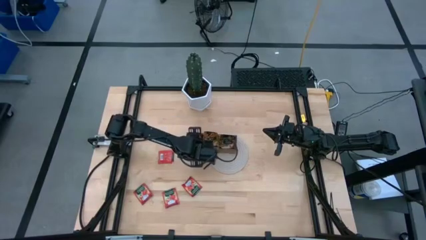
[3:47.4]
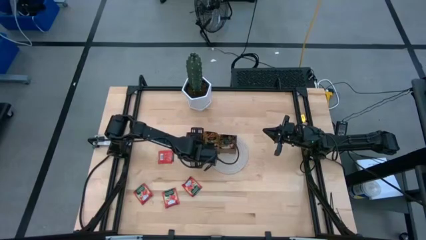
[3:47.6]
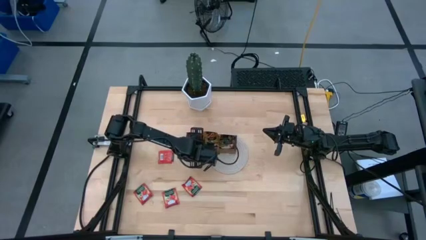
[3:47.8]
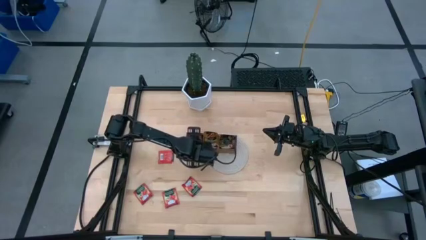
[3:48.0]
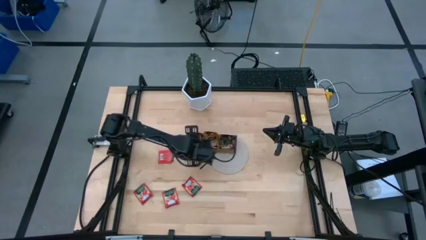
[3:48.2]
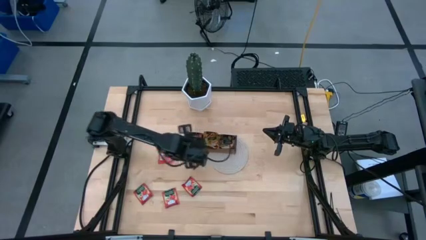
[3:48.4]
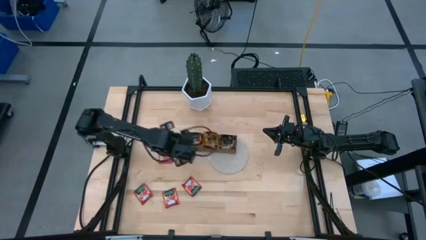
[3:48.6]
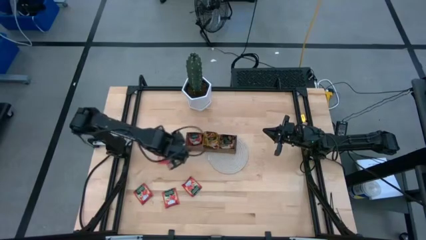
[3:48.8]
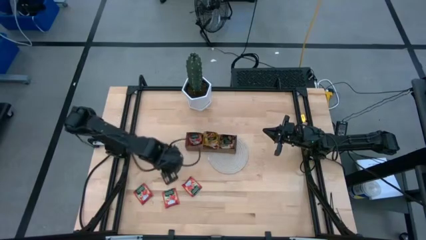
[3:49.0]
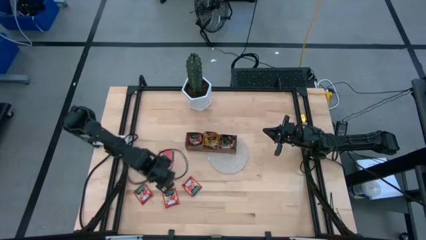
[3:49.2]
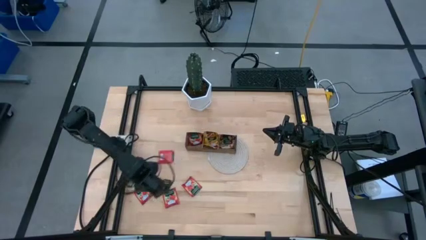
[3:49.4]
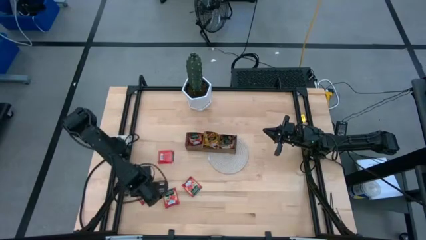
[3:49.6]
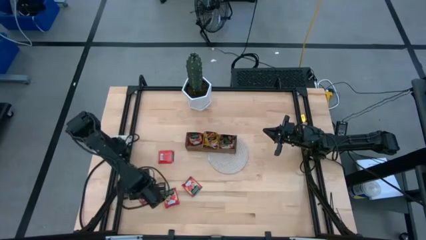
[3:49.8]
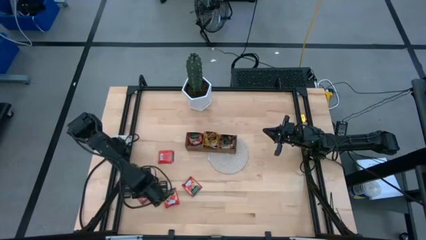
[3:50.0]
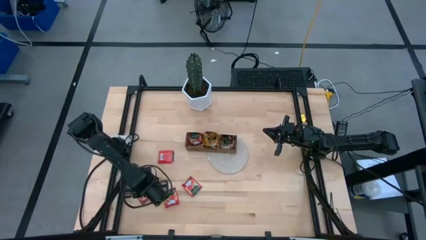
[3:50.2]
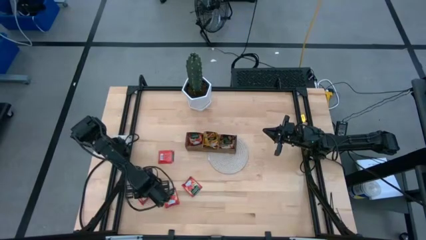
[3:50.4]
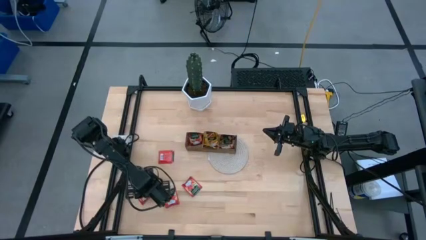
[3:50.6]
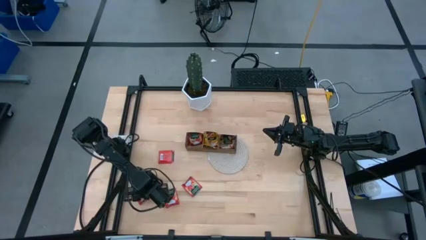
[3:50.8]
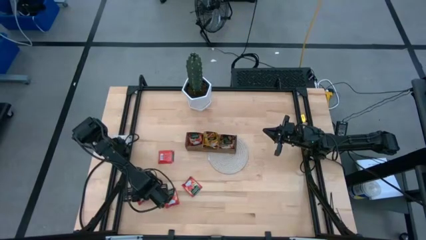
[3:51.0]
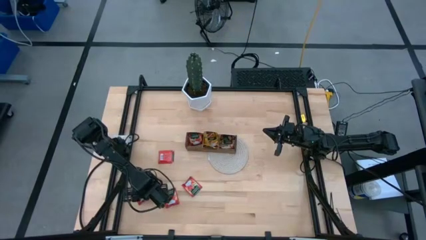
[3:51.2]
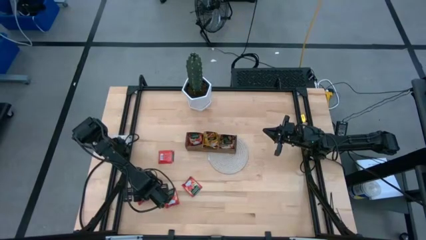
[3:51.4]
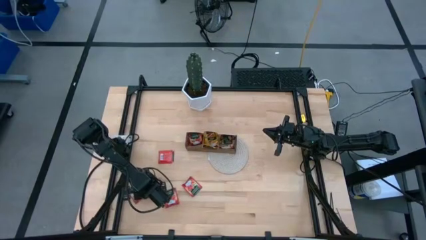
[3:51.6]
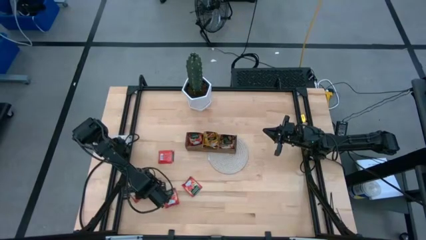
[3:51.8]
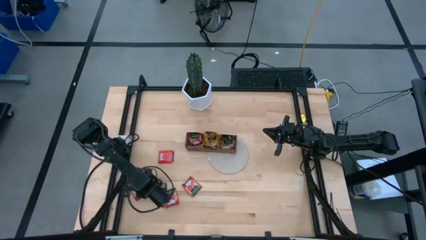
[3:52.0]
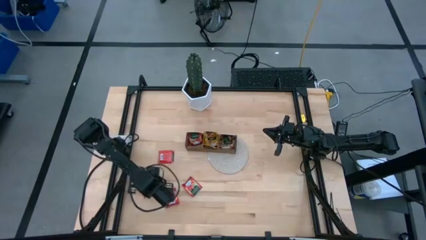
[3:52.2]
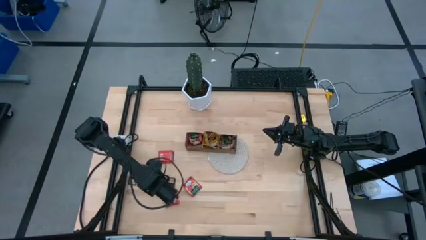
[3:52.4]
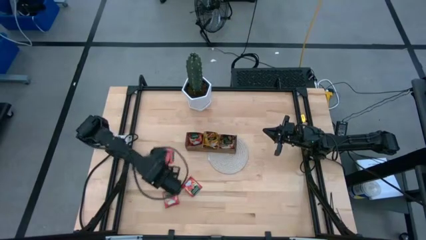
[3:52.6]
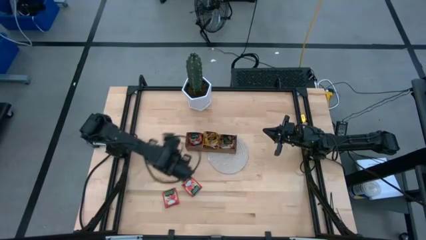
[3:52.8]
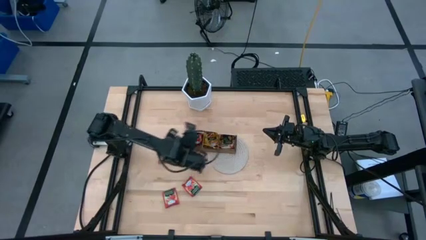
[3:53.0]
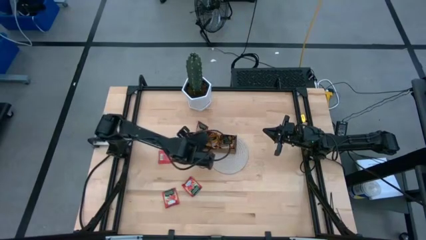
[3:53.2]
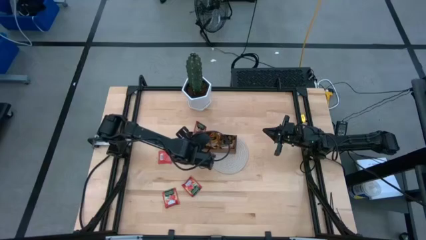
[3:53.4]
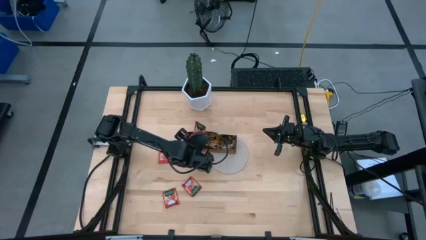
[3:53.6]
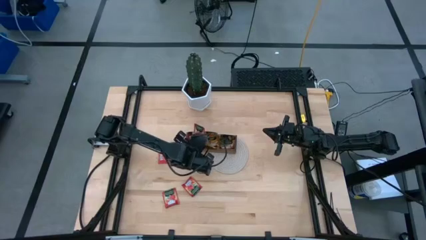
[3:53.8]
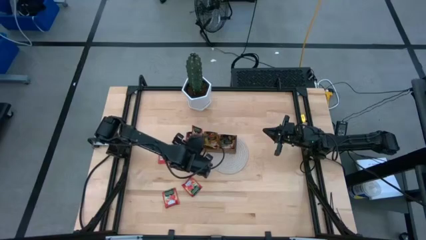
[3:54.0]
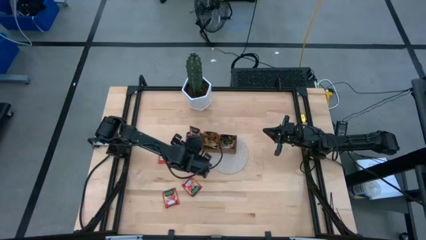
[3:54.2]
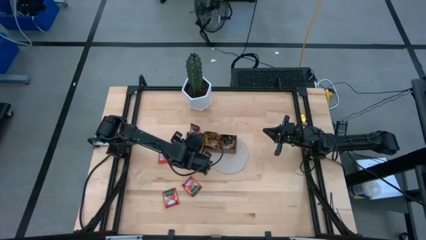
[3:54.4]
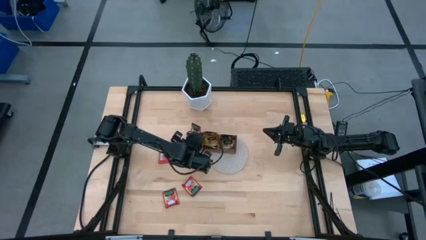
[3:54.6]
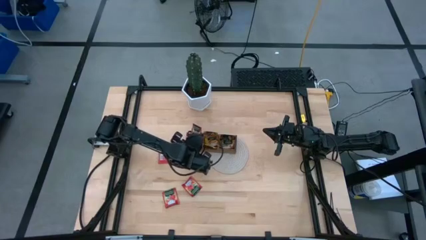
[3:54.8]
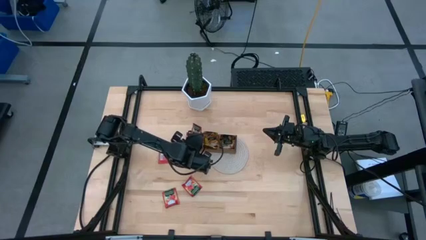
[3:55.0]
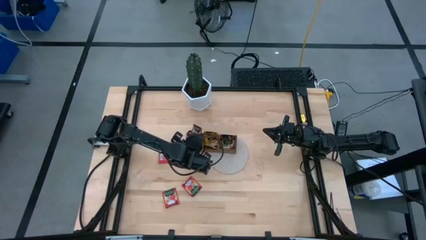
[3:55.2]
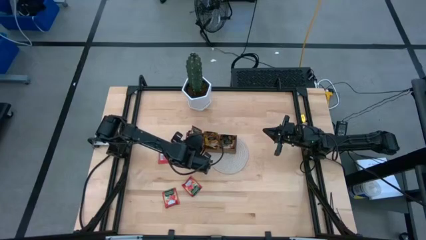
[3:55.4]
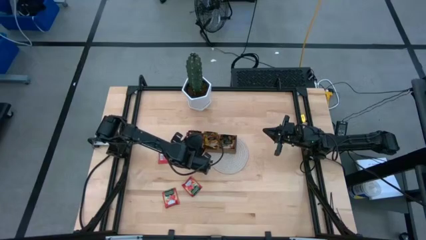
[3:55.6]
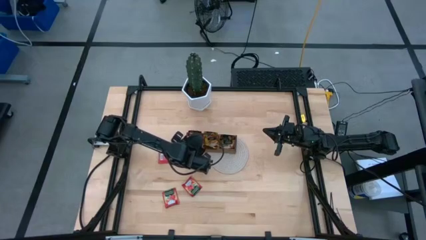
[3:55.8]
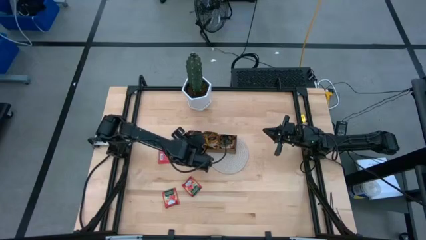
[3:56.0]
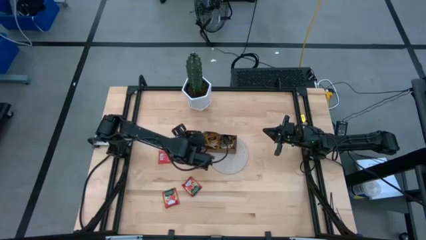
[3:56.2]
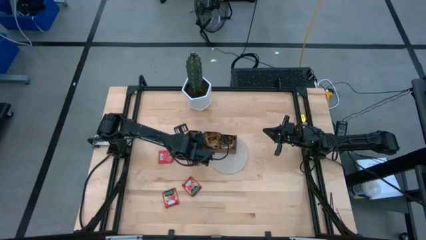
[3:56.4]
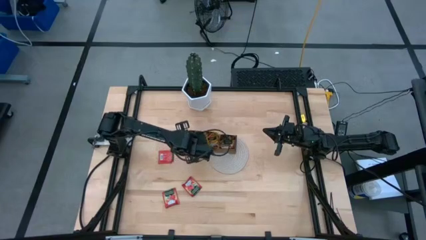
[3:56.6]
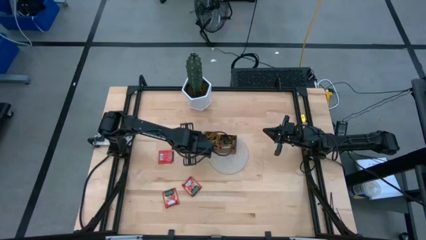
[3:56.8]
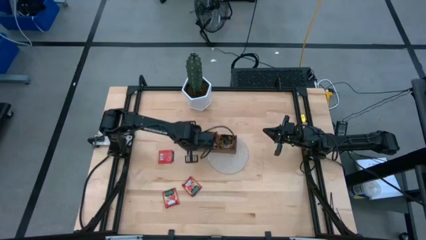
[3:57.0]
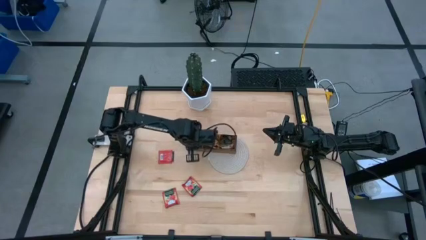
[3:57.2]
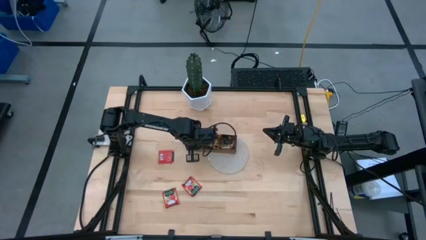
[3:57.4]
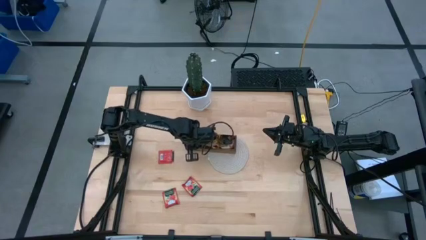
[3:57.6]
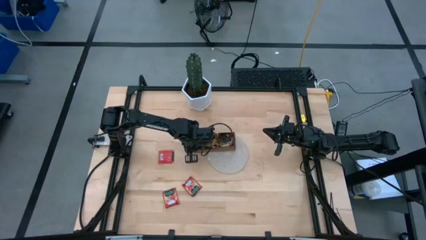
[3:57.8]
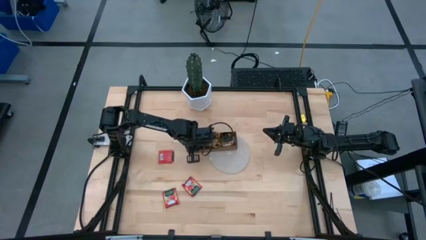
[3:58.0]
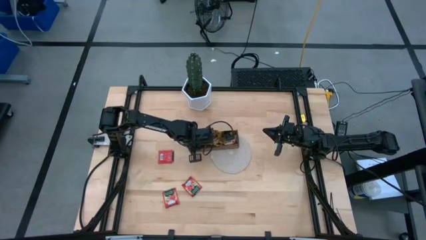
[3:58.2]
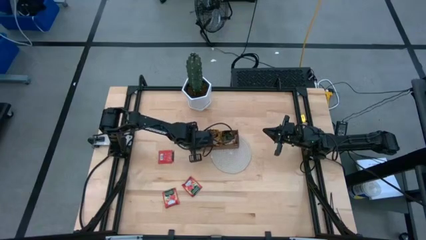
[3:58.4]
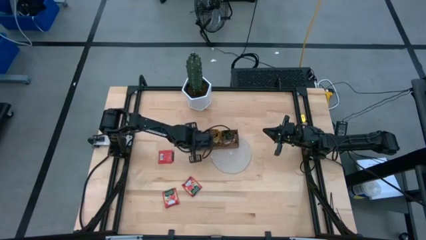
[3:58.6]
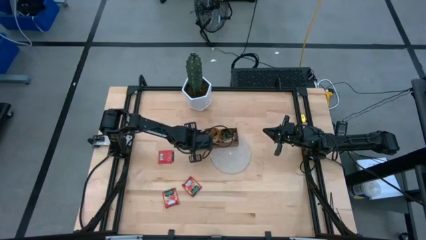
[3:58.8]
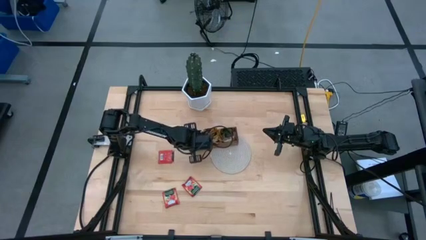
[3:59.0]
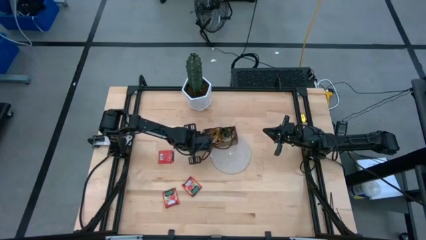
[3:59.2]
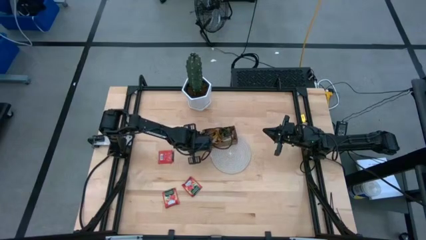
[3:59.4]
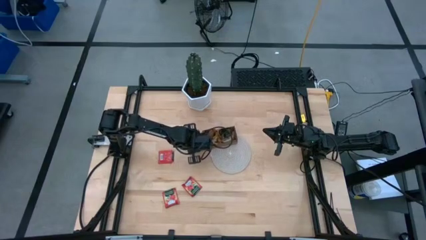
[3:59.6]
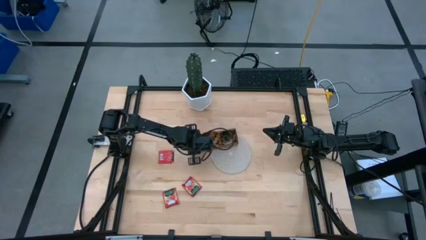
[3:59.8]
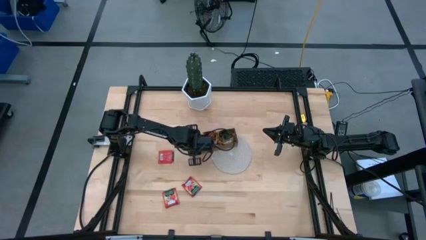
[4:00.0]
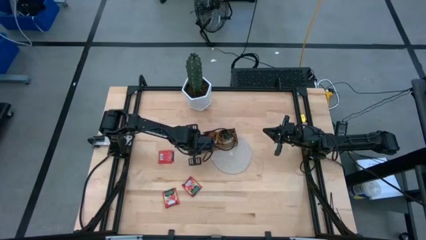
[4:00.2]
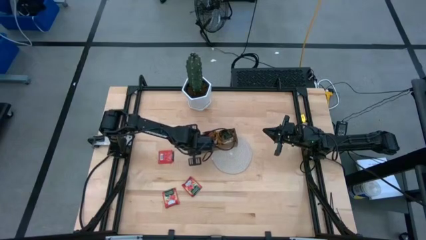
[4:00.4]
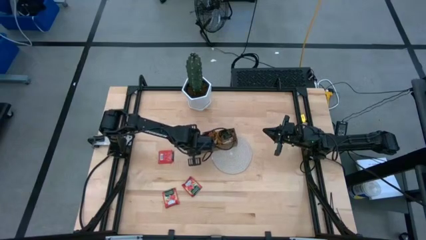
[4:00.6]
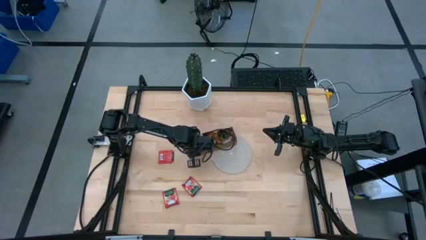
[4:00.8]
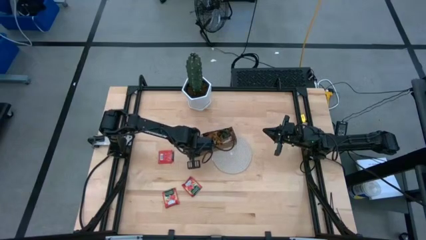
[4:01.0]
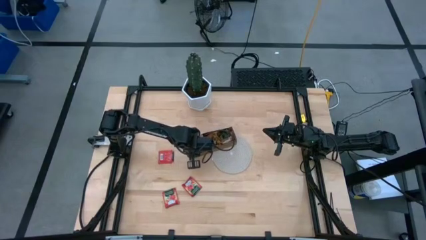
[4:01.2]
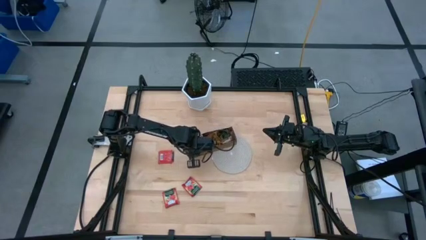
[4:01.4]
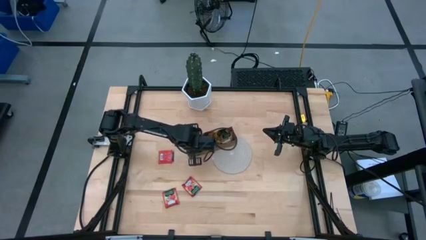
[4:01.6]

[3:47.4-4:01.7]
Task: Pick & Place Tea
Put the red tea bag into the left section of the wooden organizer

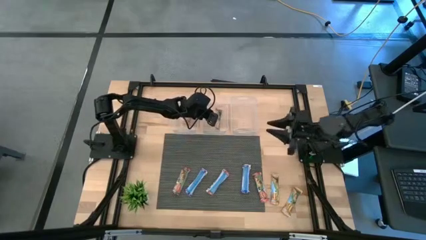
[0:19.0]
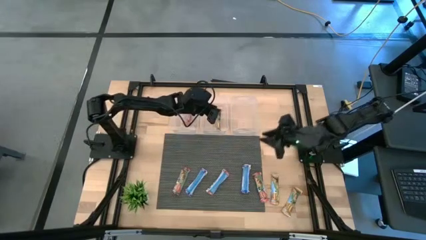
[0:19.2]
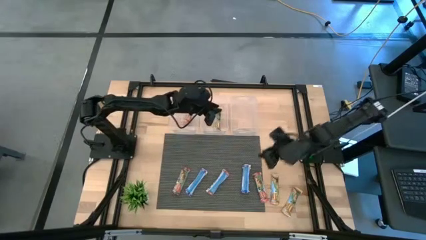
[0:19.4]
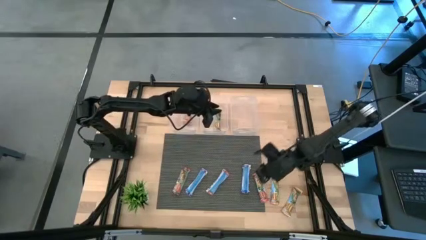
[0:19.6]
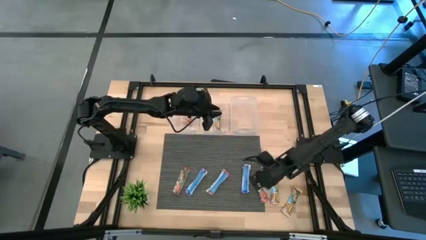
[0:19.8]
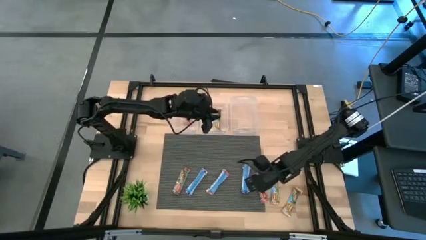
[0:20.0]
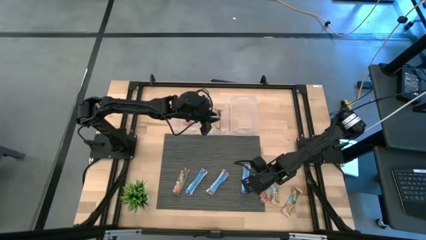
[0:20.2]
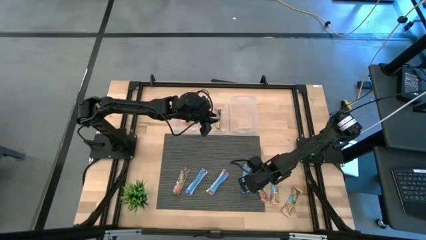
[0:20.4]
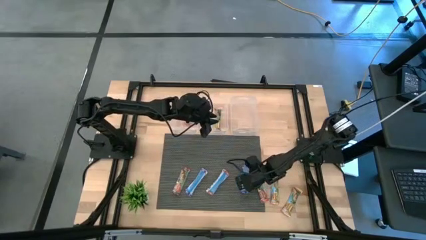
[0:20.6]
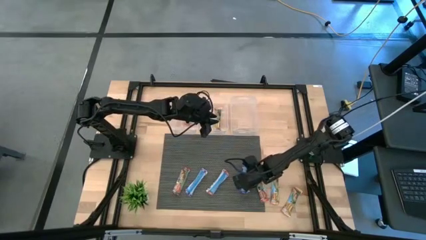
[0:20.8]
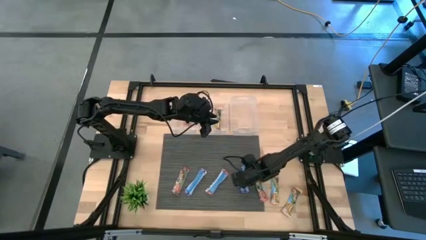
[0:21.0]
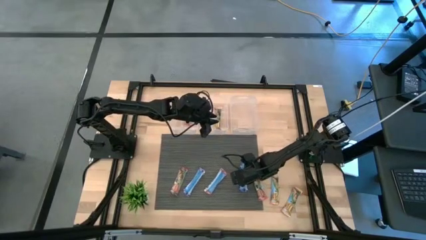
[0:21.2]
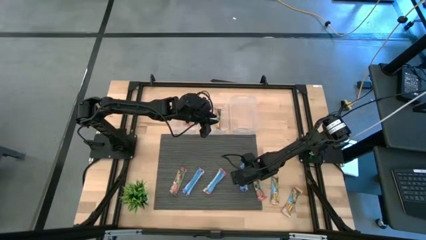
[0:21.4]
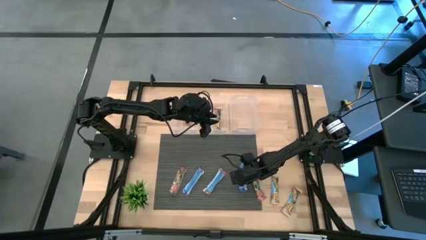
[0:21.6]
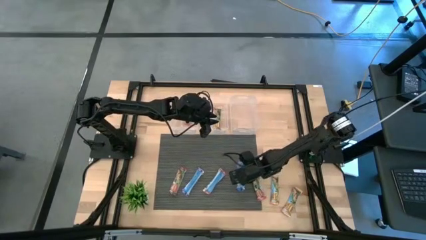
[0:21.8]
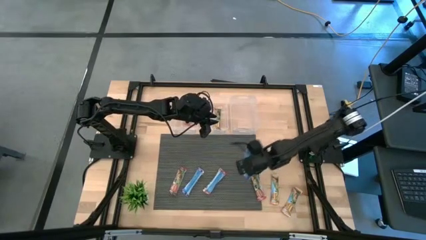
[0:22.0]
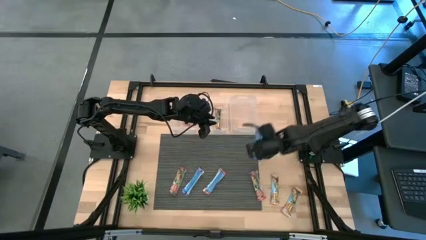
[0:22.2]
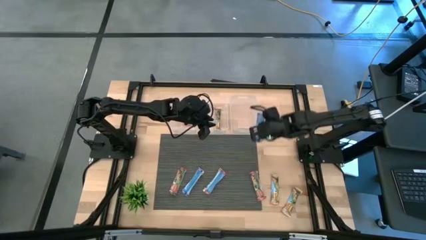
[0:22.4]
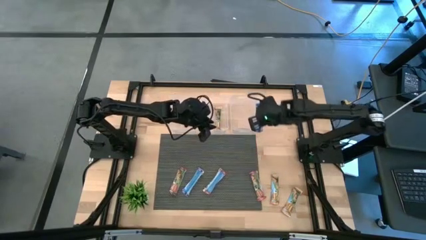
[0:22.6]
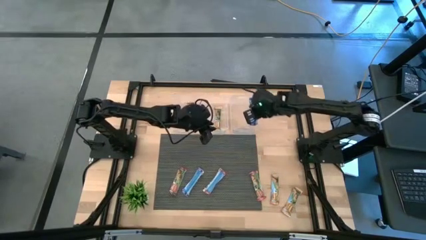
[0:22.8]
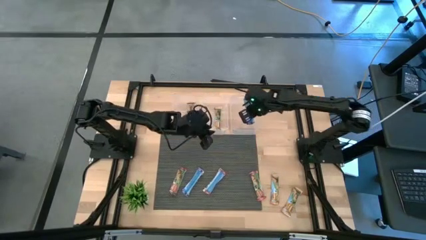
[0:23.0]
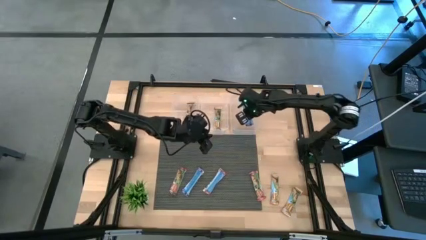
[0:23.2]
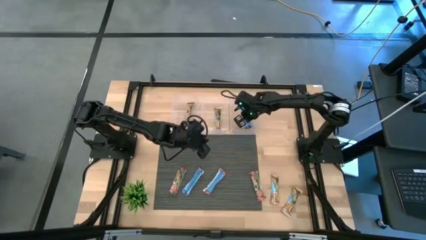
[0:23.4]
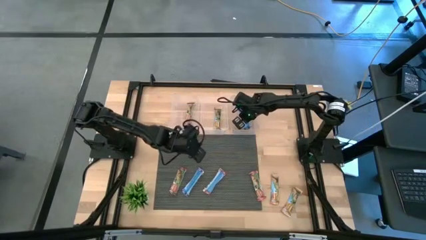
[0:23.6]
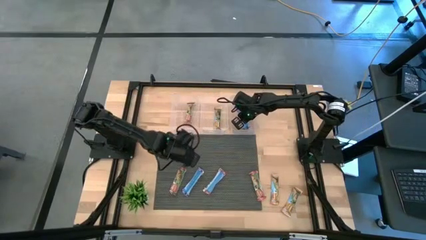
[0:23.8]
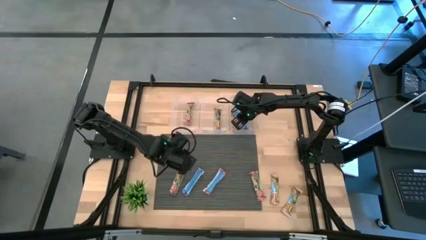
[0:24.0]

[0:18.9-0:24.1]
Task: Pick and place Granola Bars by type
Put the right blue granola bar into the right transparent bin
